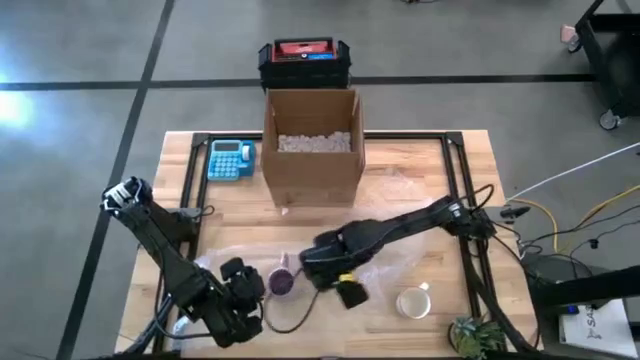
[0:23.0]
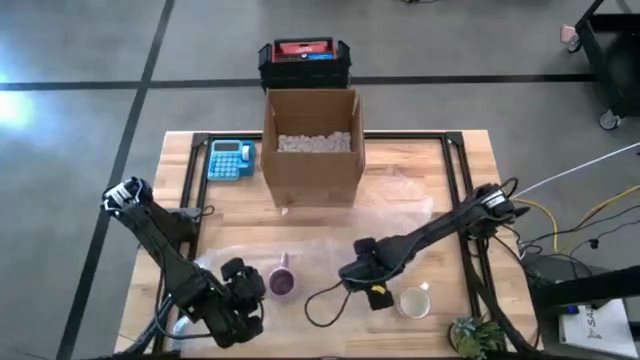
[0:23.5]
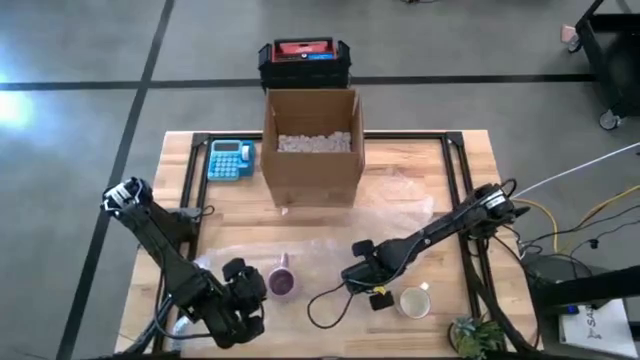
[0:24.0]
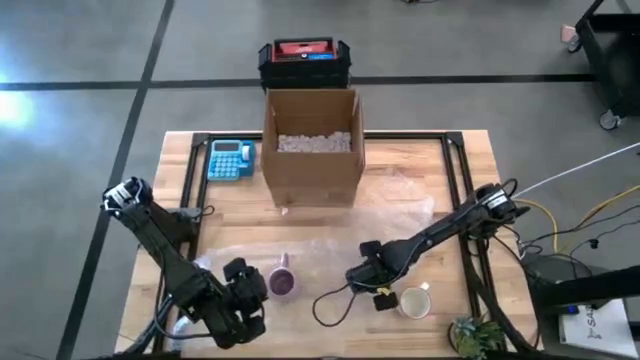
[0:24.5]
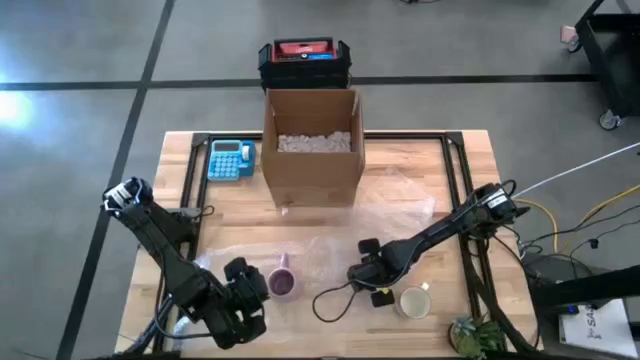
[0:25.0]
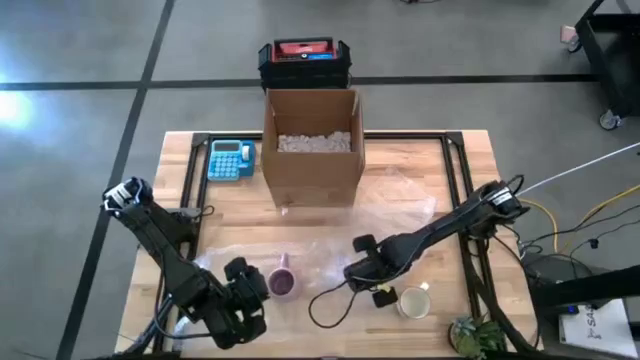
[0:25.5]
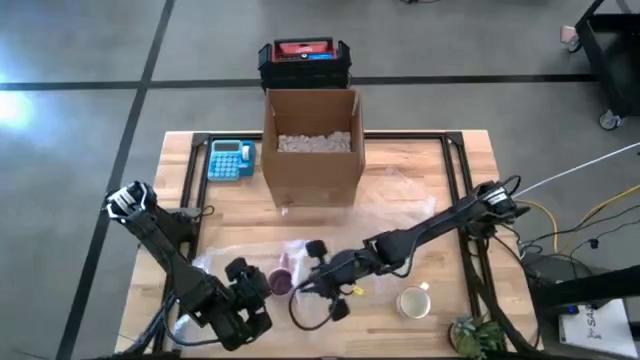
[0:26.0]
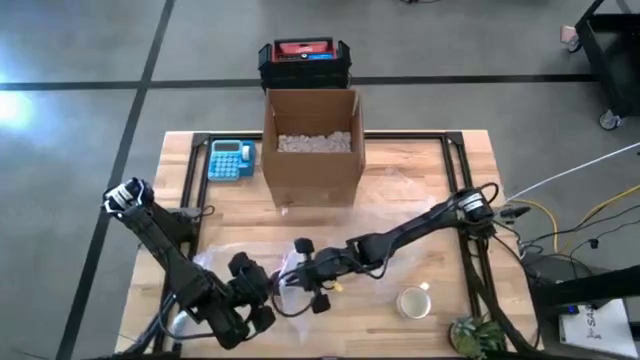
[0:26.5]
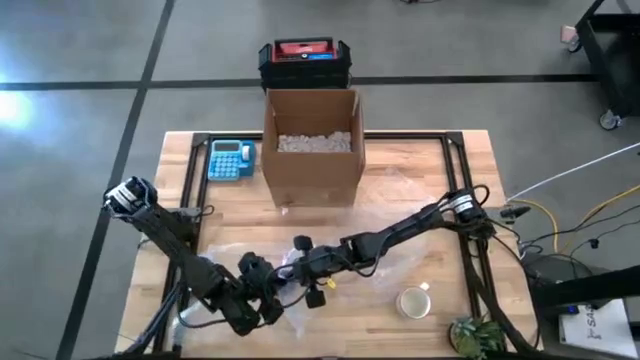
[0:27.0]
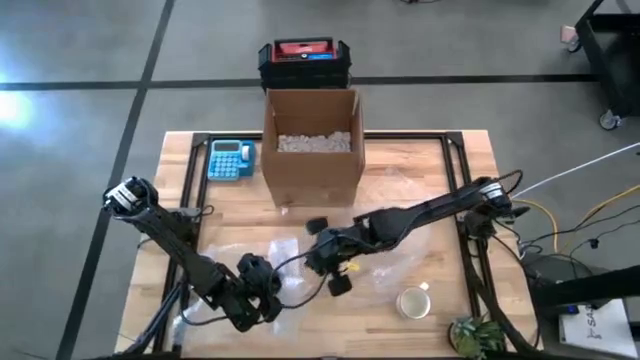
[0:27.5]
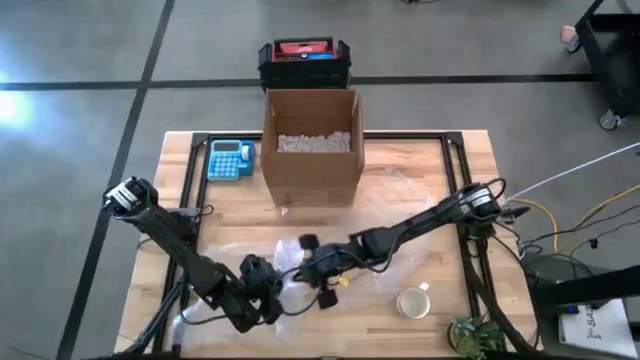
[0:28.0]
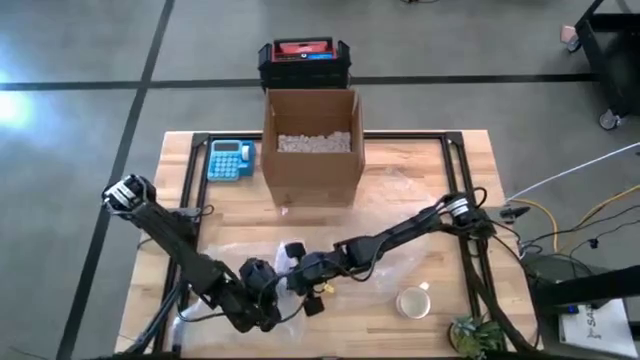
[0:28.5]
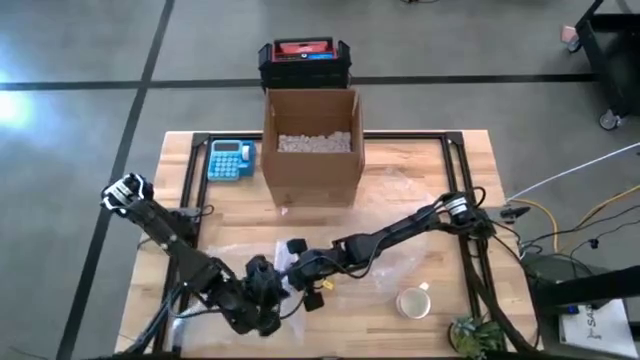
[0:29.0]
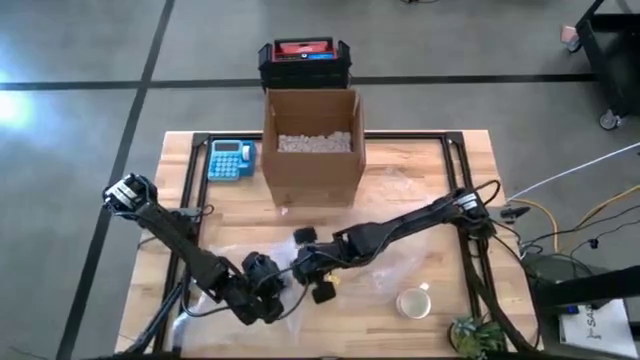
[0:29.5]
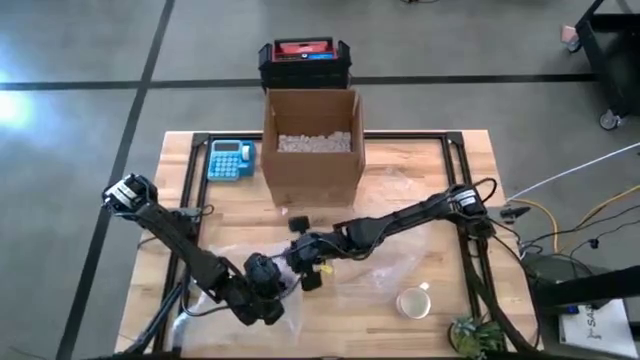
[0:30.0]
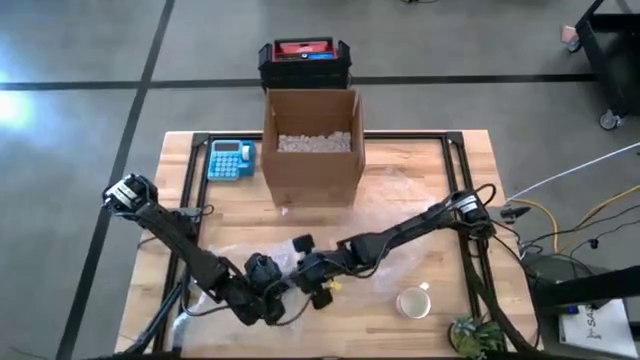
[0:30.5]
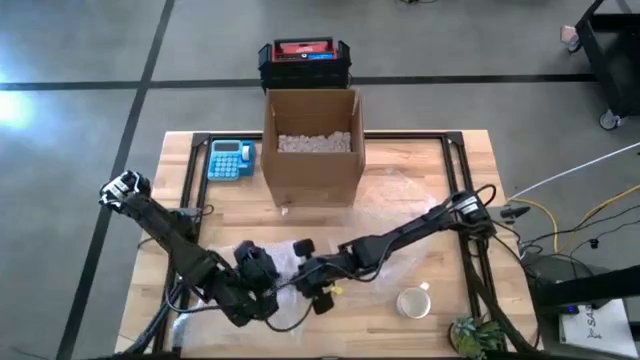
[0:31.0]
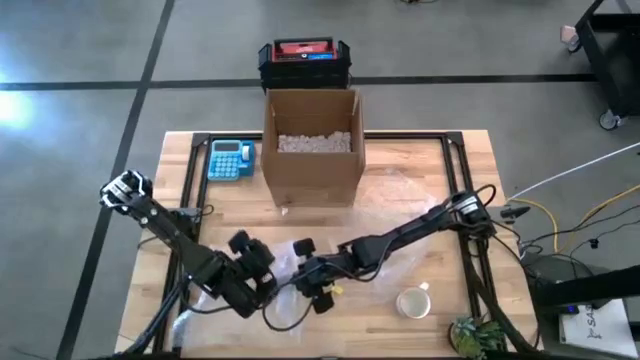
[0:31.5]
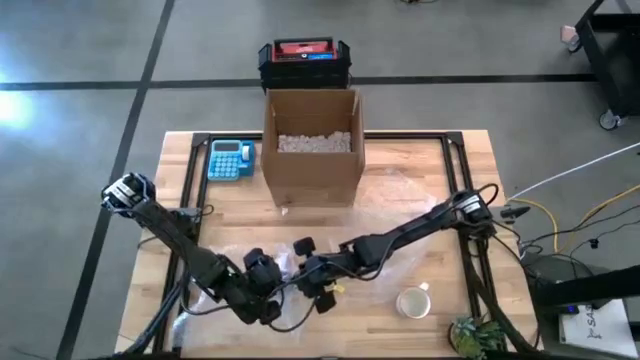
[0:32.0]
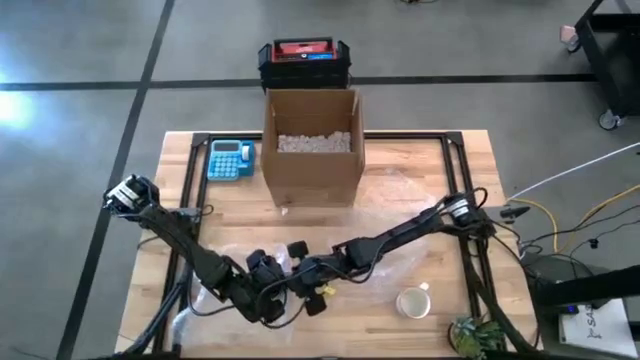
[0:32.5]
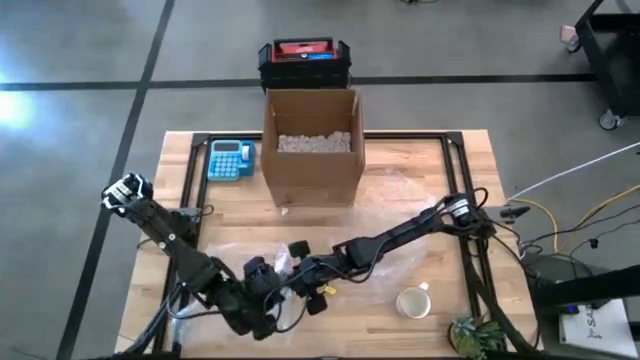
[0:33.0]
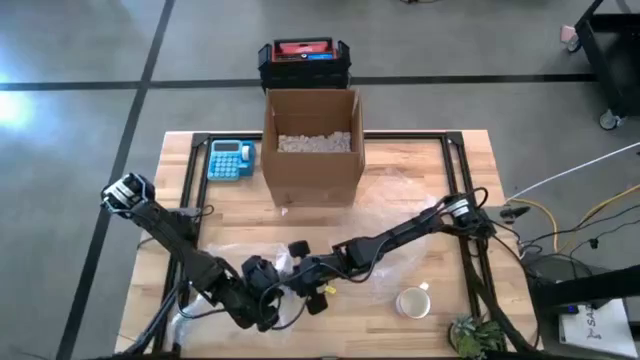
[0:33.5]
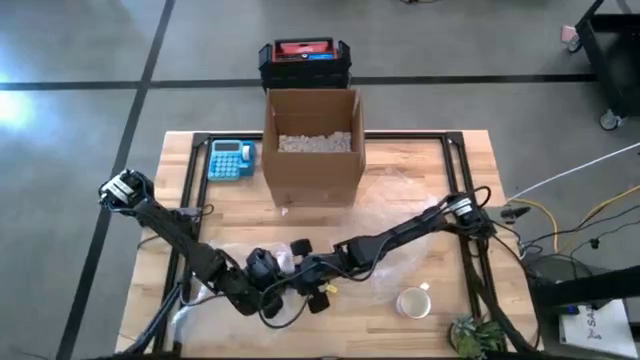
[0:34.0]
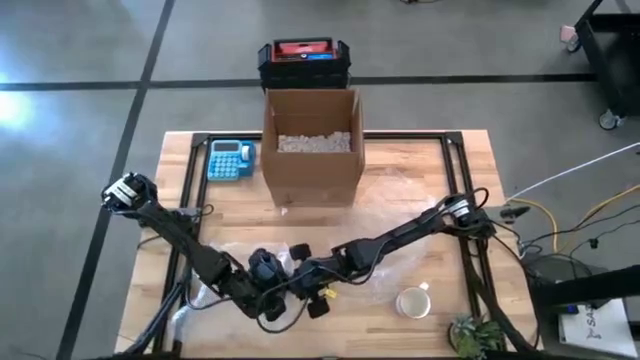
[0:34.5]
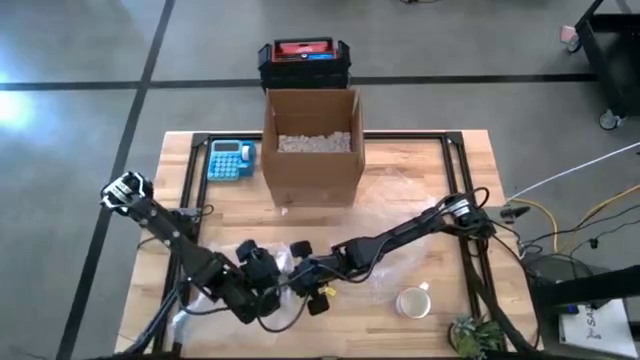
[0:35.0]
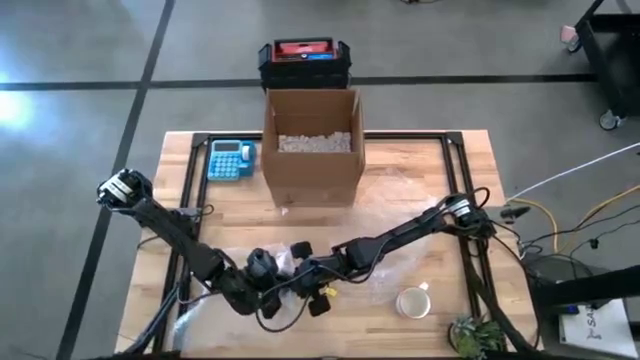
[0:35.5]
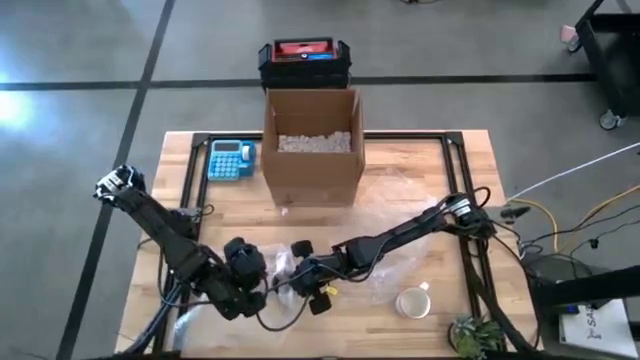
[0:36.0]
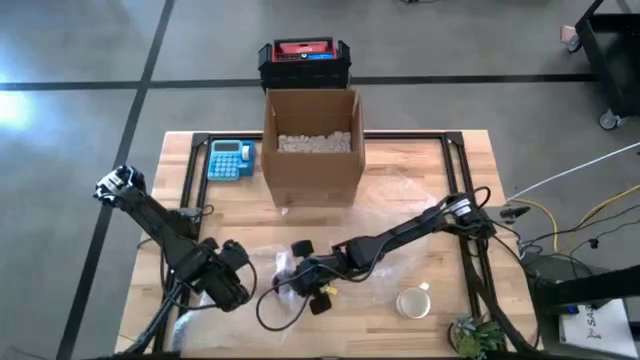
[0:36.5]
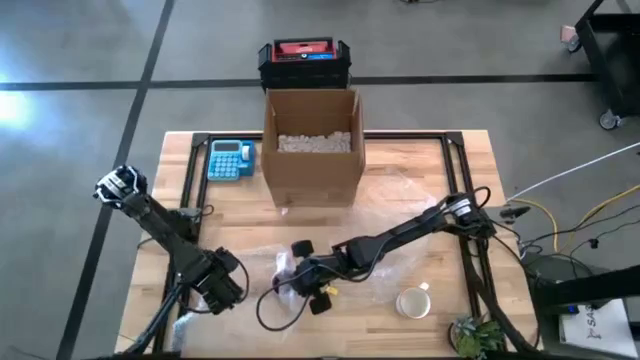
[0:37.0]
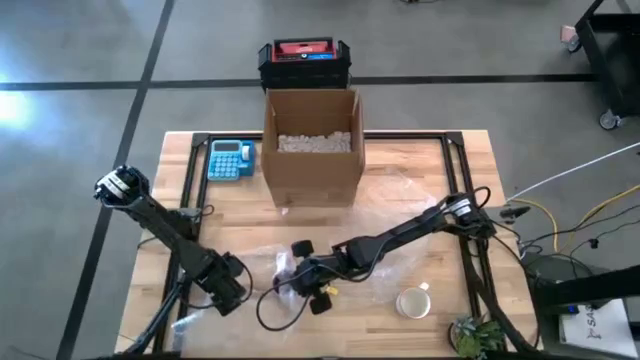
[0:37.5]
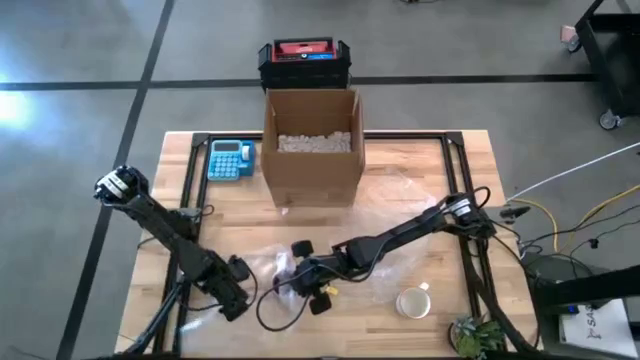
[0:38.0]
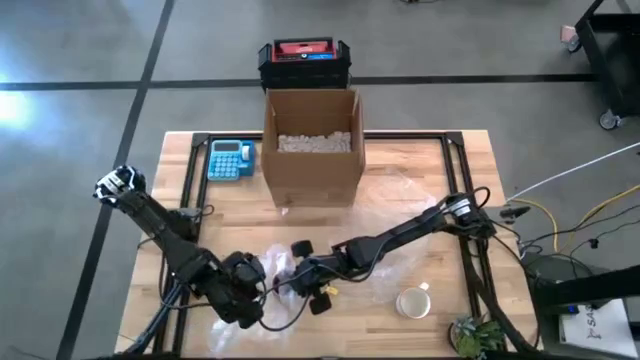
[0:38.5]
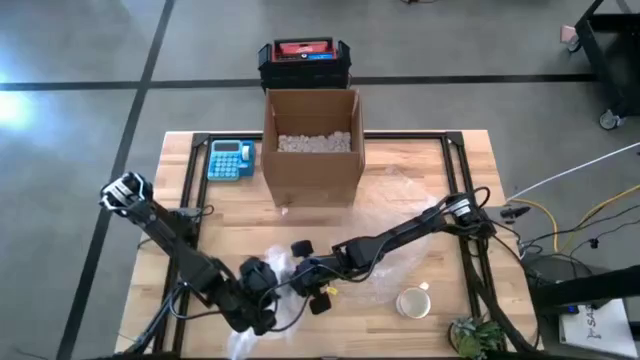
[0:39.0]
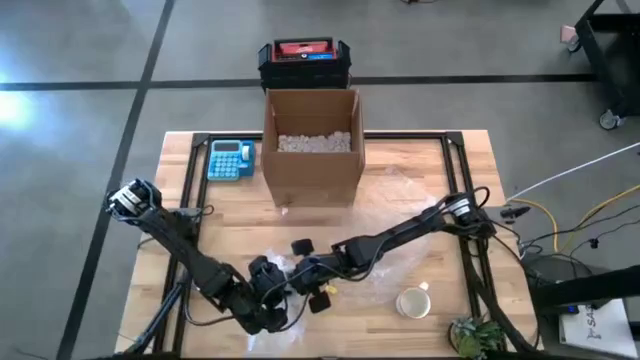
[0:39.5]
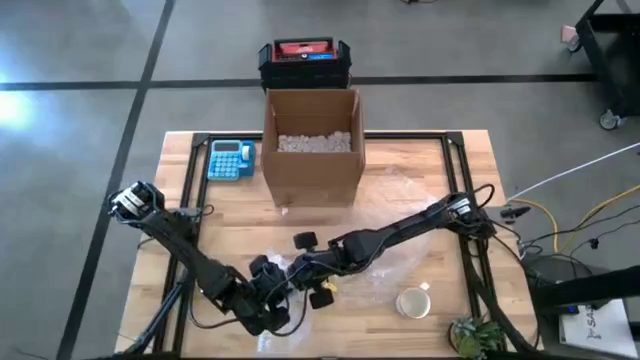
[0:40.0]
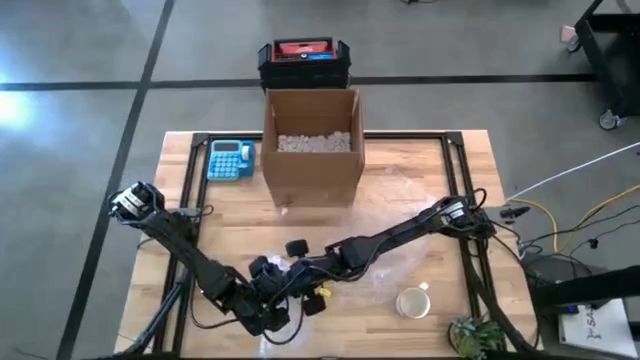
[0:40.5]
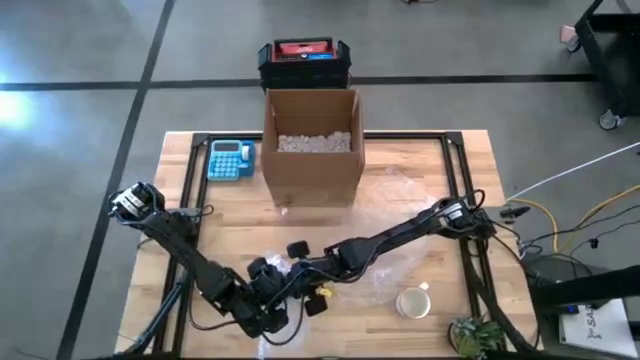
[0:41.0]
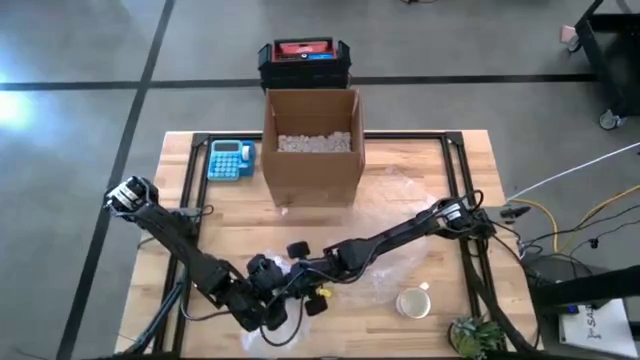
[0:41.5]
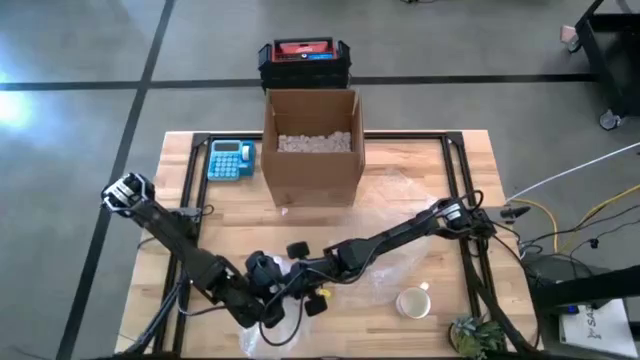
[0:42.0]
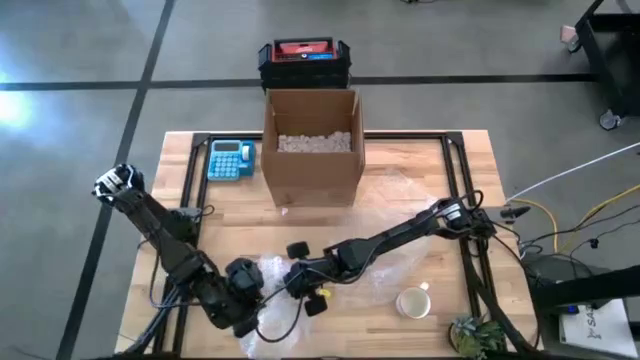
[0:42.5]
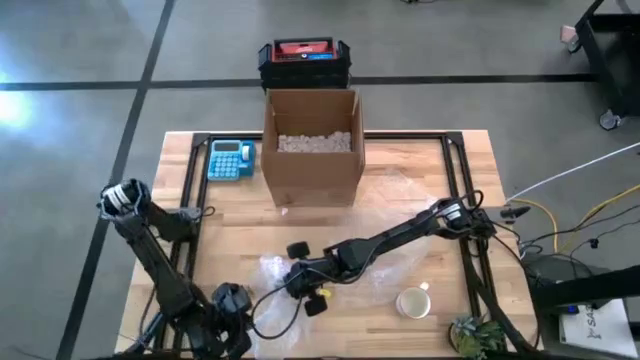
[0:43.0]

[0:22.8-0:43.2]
Task: wrap mug
Wrap the purple mug with transparent bubble wrap

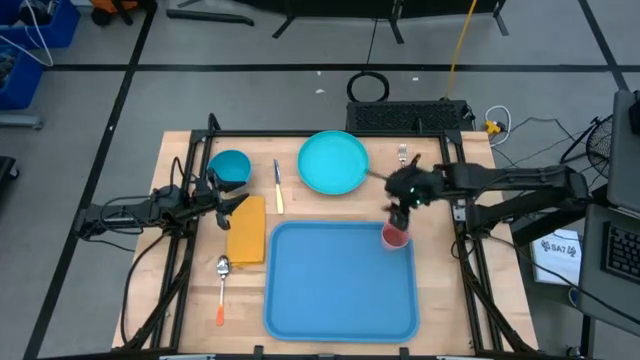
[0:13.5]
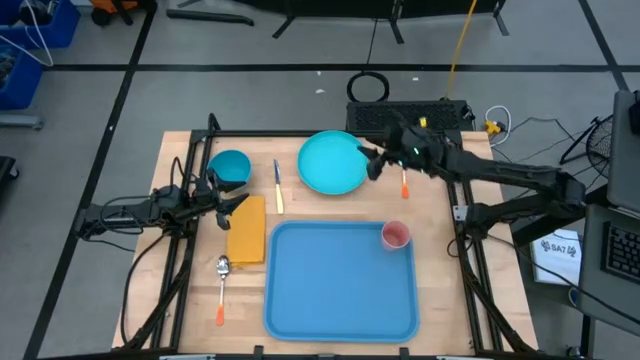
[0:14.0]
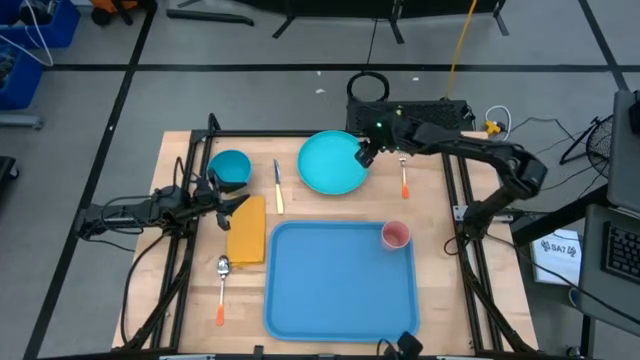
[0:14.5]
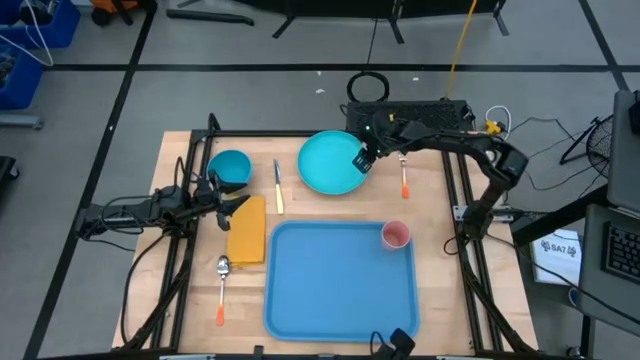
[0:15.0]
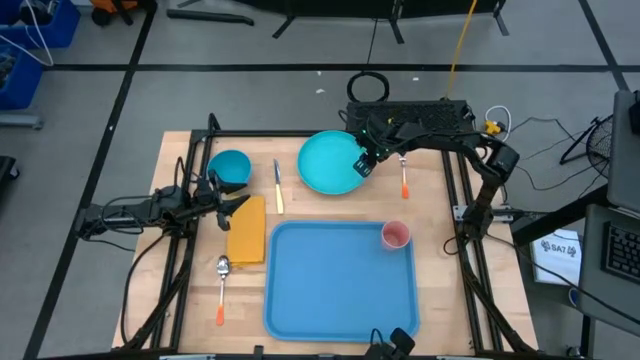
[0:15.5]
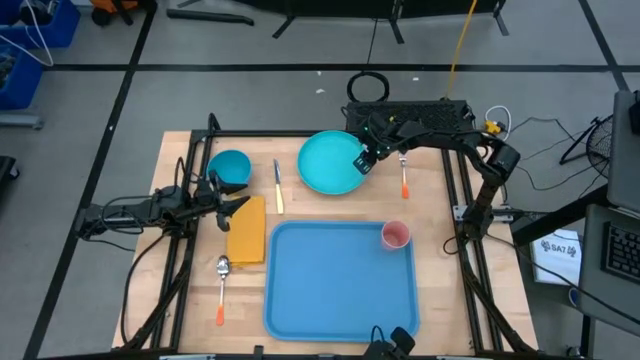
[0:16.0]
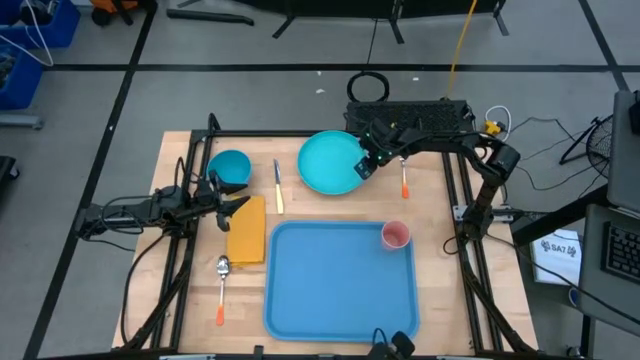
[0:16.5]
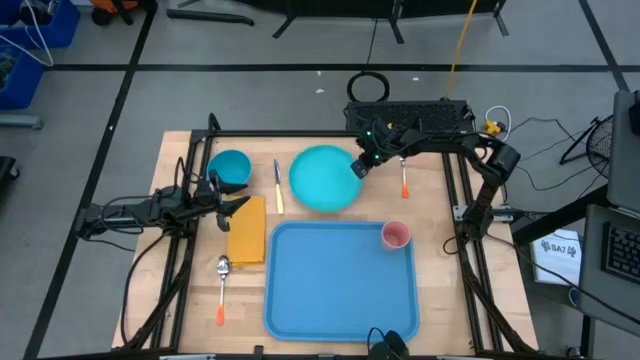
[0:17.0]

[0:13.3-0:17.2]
Task: Set up tray
Put the green plate on the blue tray
